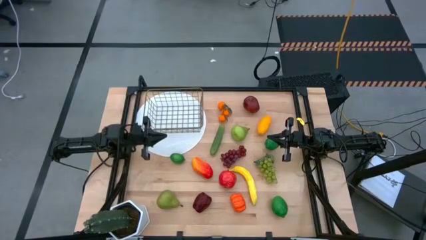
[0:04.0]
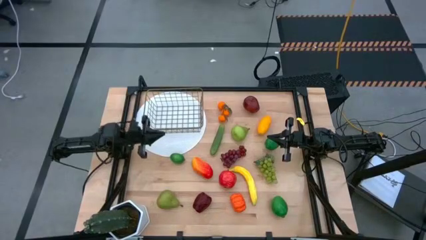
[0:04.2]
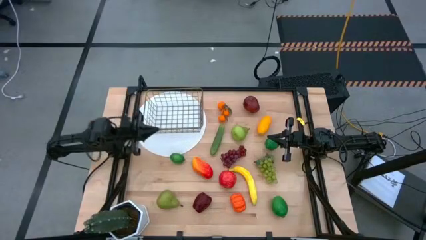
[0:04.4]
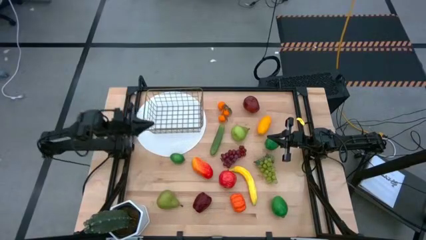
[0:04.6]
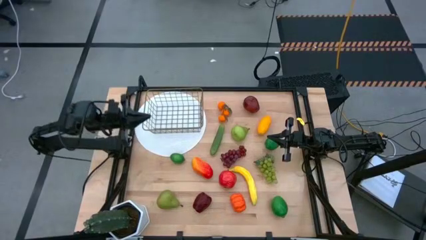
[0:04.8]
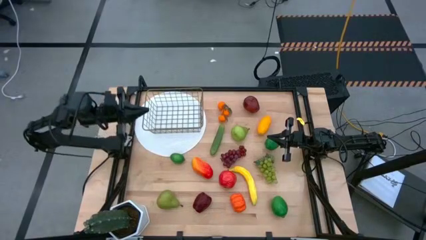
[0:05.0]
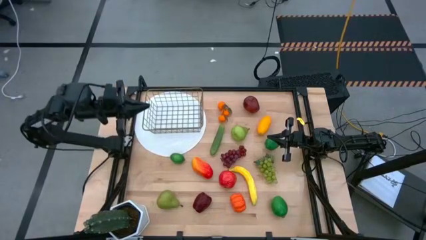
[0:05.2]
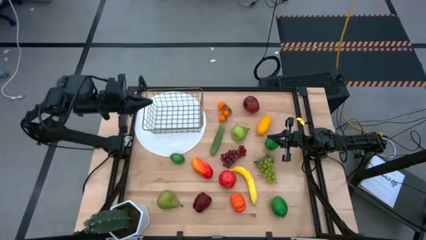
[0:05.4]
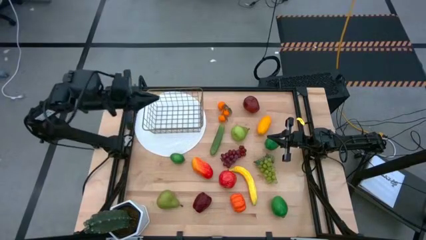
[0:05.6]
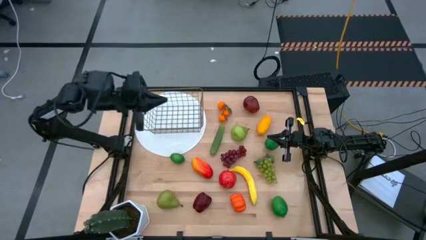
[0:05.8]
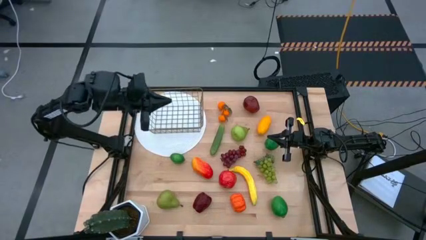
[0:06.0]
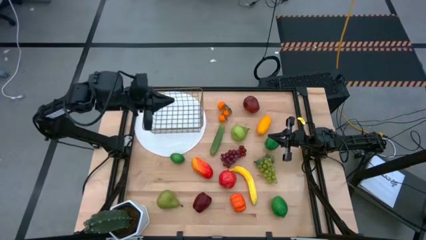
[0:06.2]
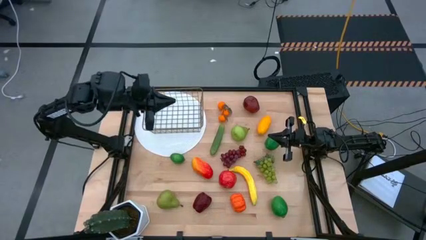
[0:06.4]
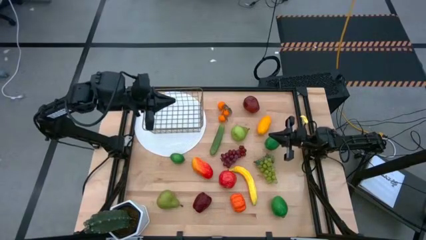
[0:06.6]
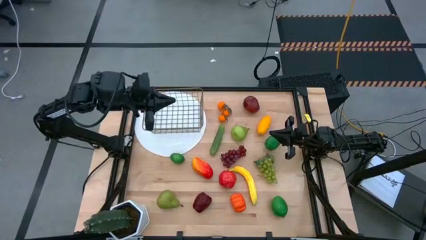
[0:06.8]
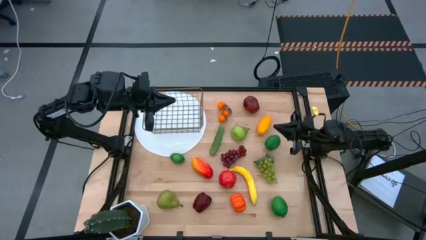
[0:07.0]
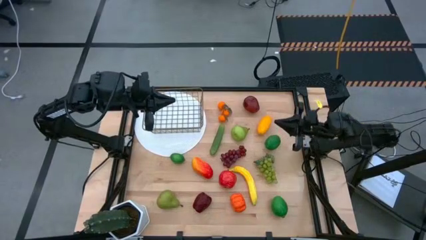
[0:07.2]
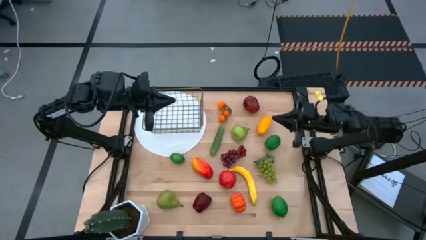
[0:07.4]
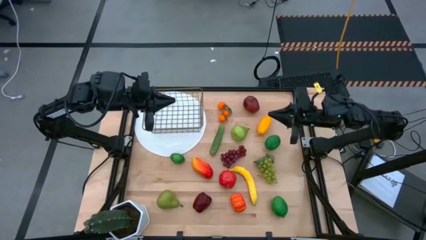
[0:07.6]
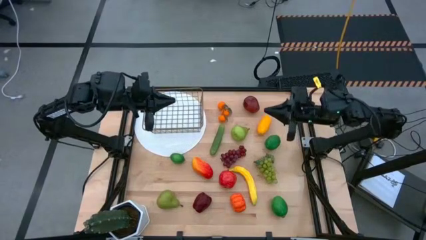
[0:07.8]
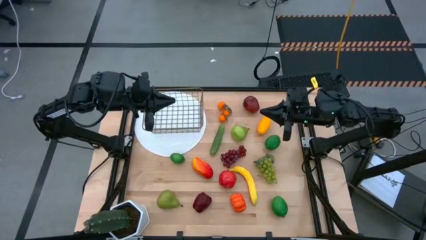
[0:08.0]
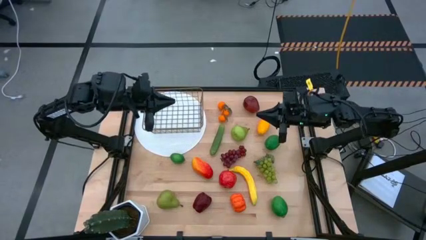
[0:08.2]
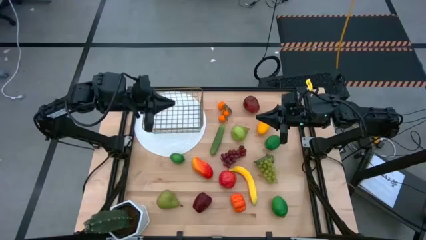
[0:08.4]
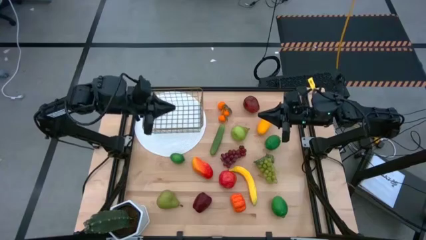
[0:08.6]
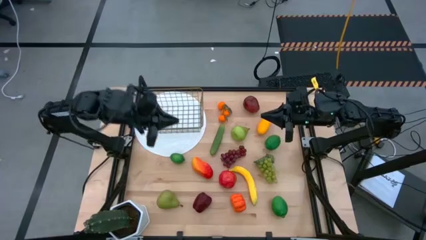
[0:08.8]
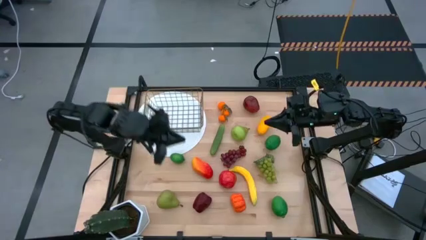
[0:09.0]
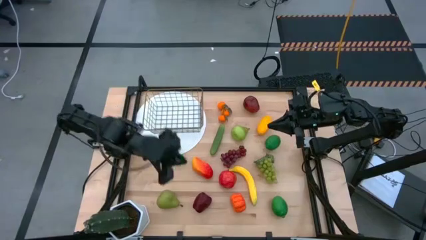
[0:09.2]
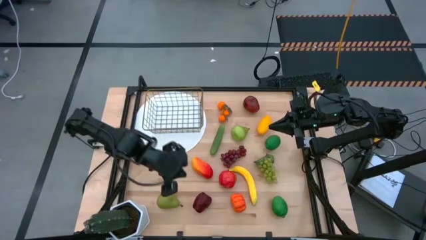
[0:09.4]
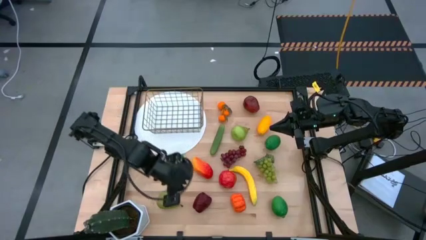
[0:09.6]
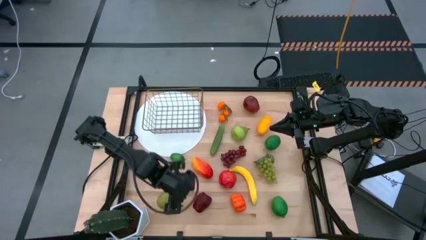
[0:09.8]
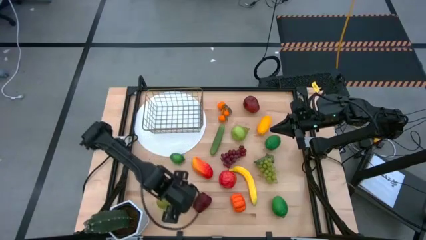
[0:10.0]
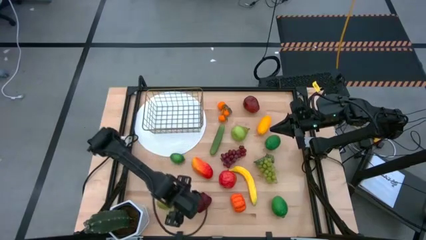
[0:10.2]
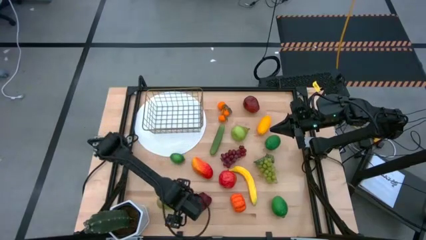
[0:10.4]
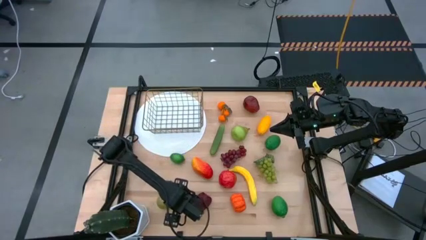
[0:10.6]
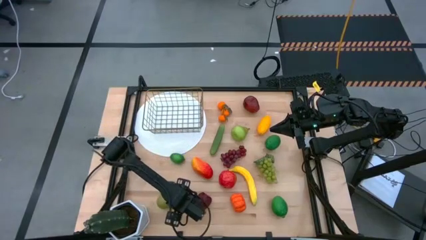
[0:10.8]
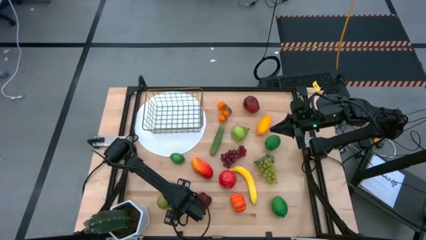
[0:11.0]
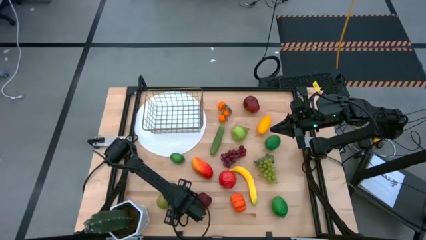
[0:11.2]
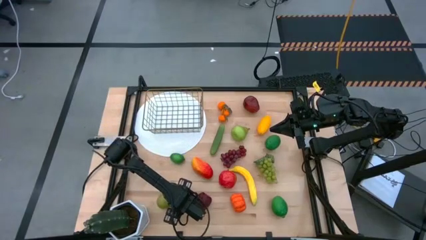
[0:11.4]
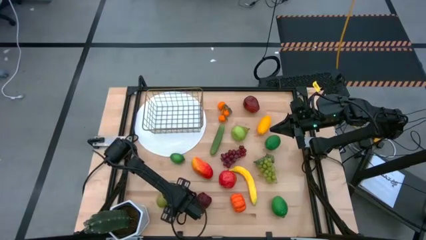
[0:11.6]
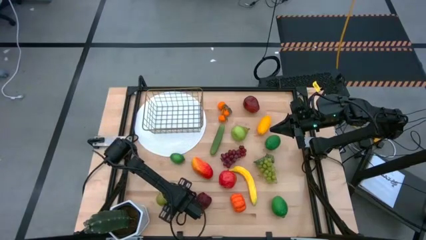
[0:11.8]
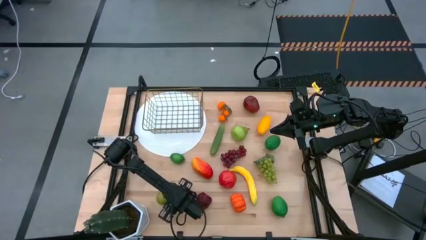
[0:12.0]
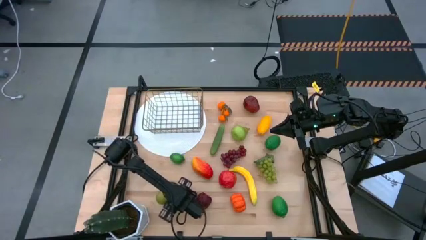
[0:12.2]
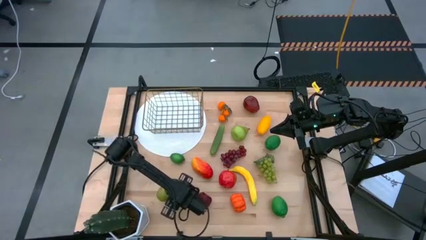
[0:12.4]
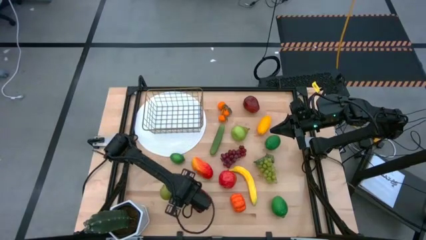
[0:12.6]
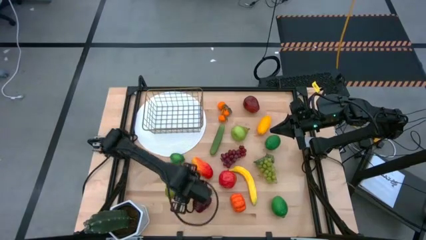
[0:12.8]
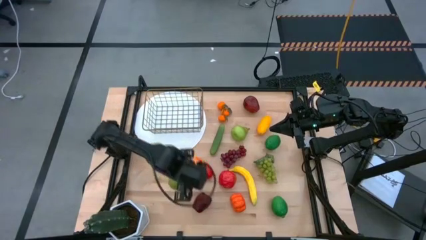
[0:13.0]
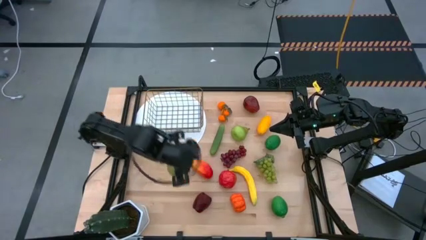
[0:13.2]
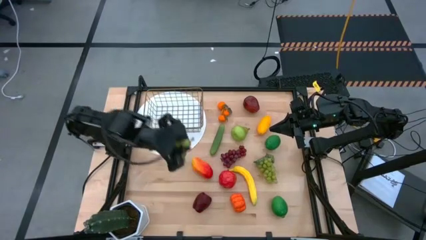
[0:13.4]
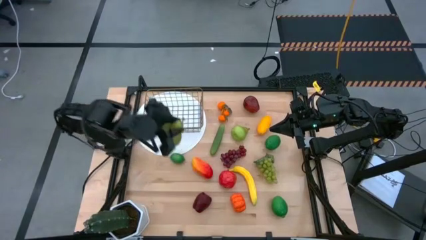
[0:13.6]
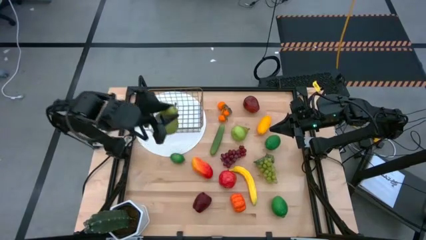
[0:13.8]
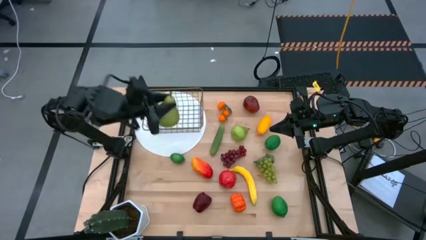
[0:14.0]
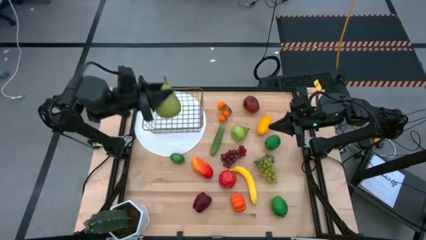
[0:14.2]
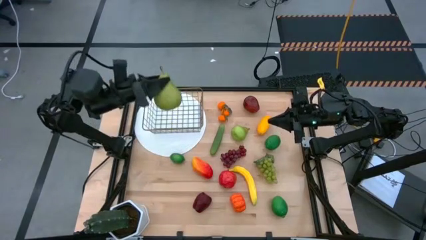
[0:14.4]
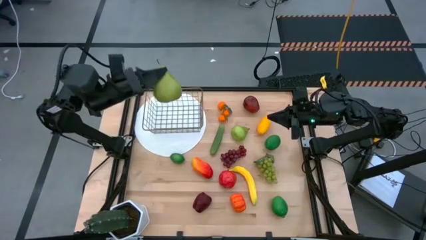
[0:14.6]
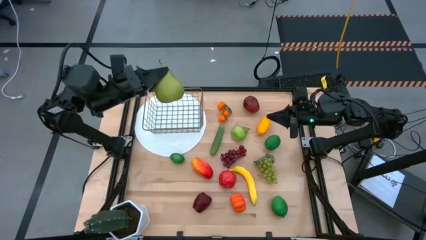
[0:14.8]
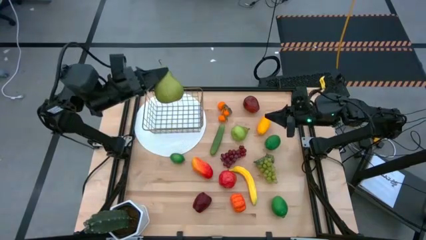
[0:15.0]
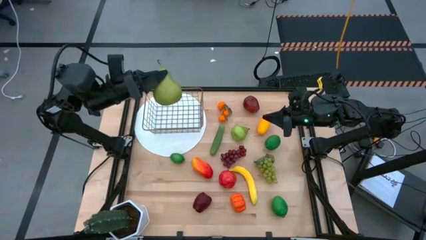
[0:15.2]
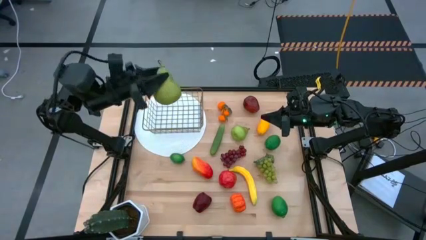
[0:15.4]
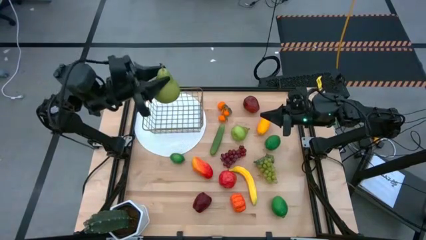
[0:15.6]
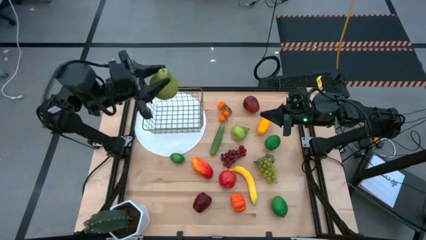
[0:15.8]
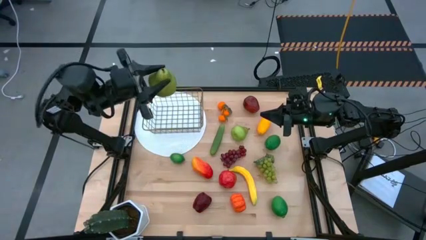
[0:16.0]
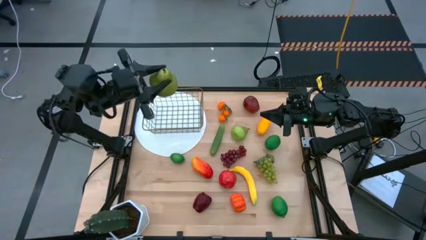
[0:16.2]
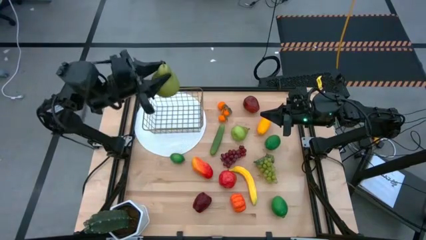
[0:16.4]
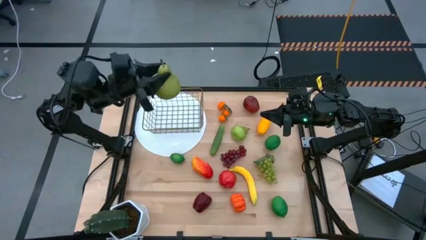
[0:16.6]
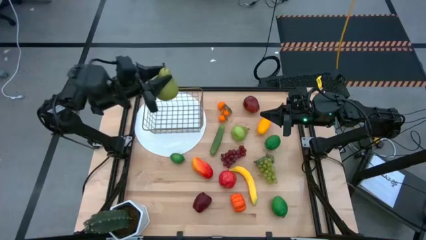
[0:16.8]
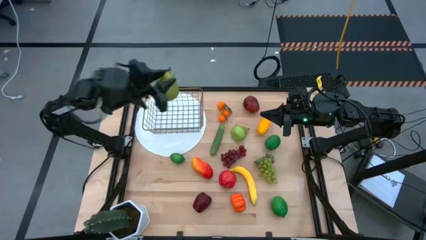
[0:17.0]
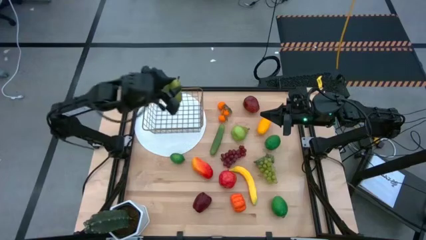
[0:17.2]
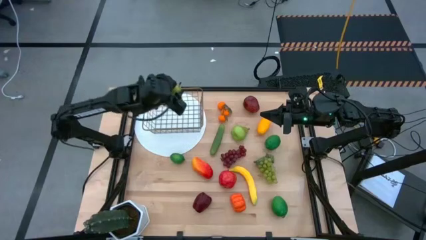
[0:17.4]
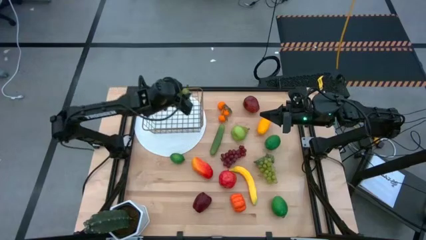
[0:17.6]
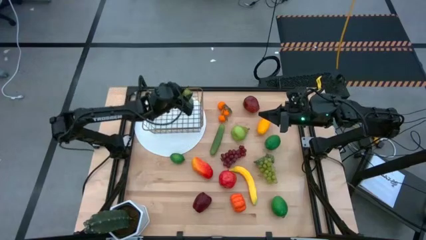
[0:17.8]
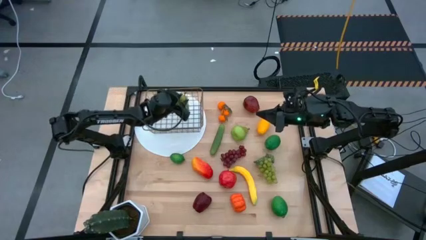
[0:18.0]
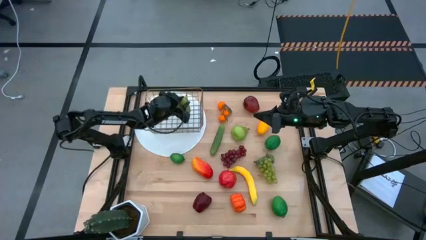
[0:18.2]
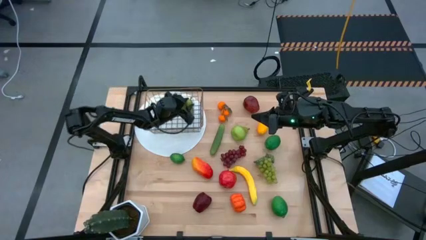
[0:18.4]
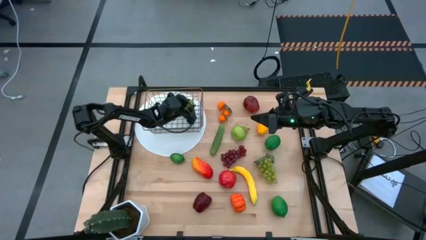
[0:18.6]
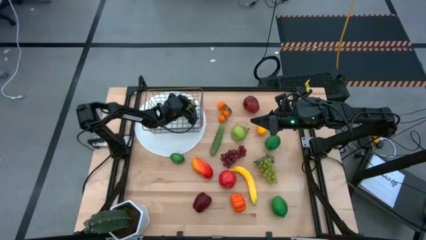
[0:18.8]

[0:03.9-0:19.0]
Task: Build produce basket
Put the bottom pear into the wired basket
